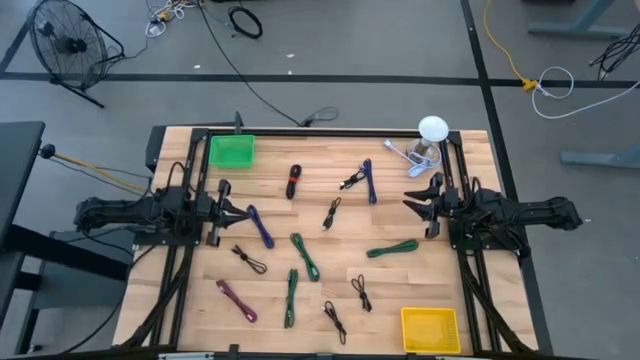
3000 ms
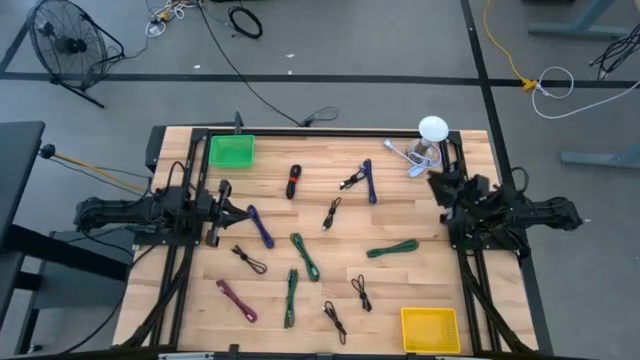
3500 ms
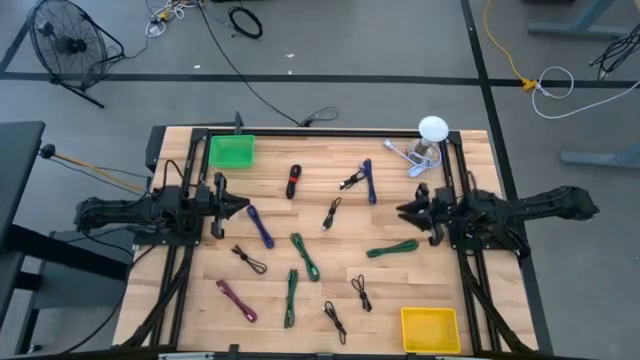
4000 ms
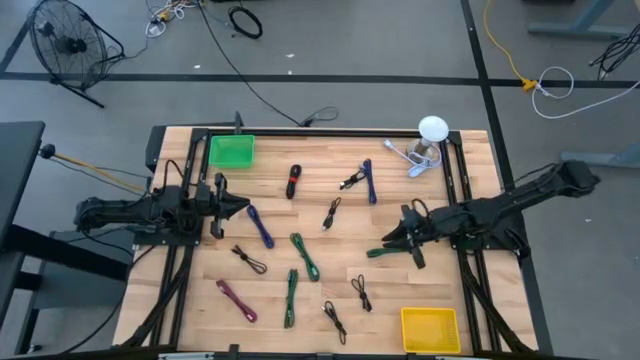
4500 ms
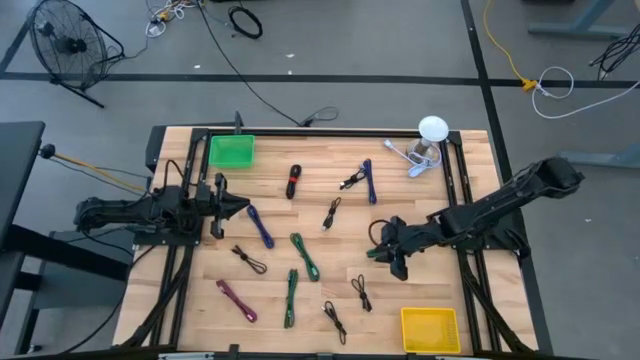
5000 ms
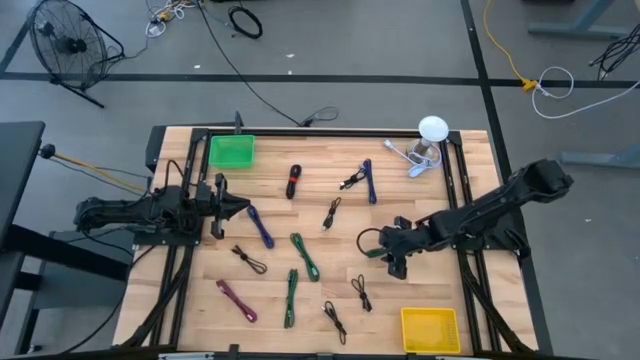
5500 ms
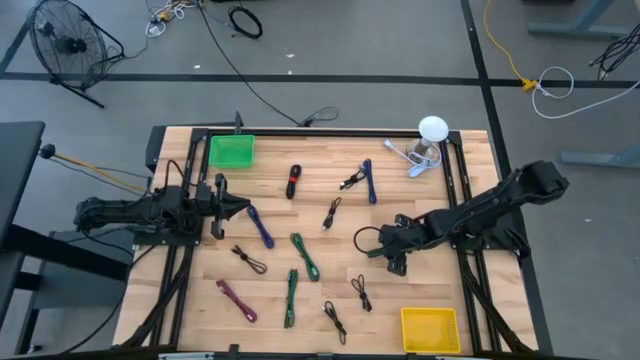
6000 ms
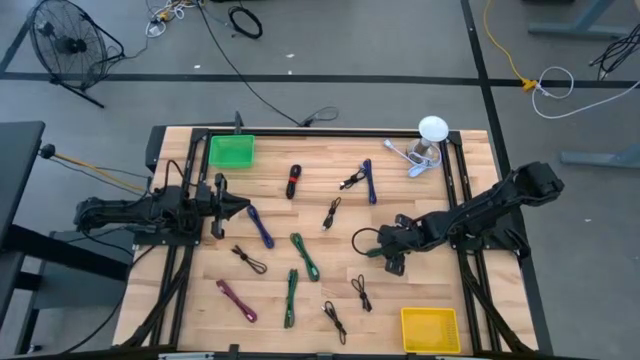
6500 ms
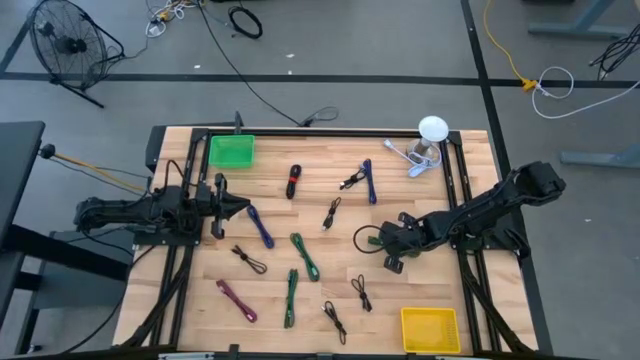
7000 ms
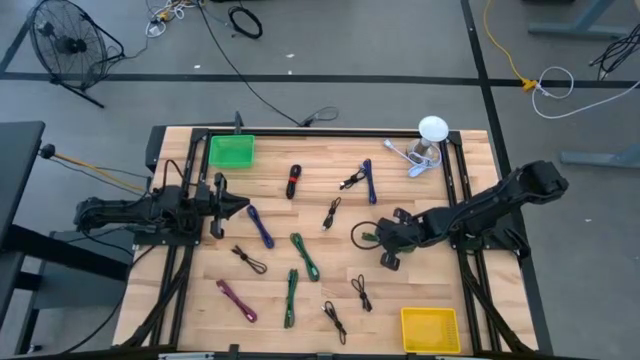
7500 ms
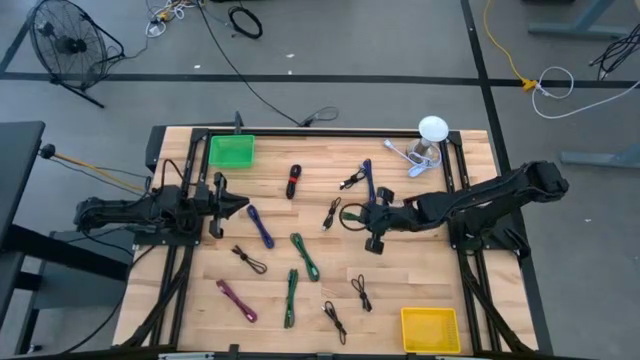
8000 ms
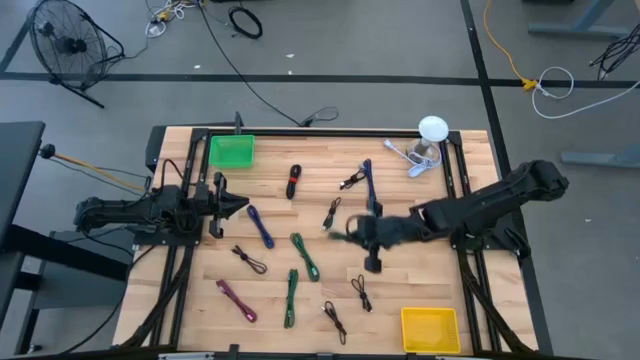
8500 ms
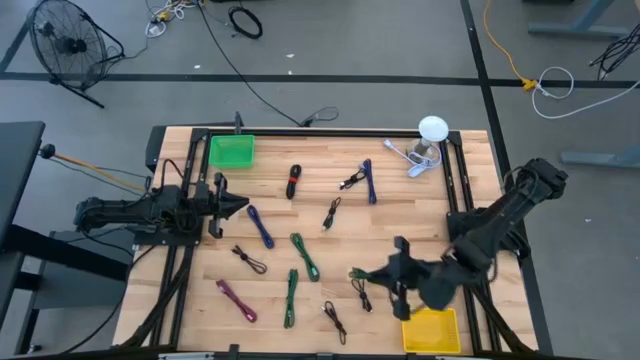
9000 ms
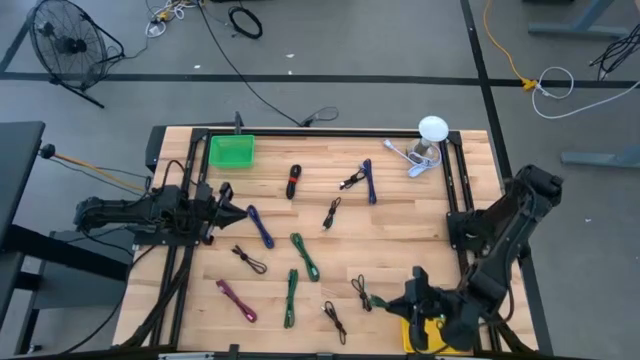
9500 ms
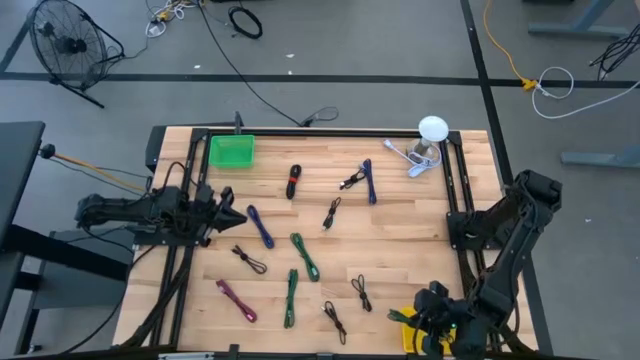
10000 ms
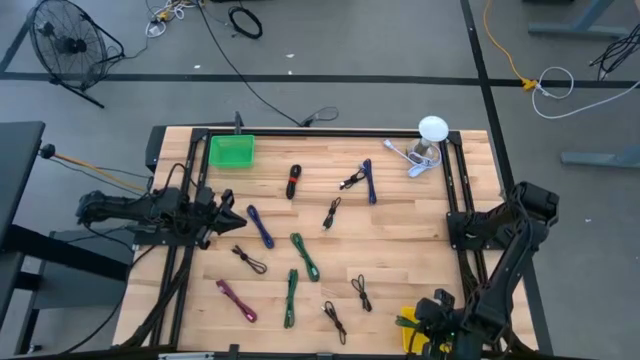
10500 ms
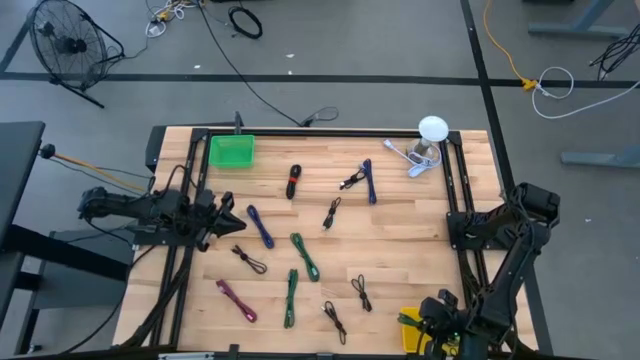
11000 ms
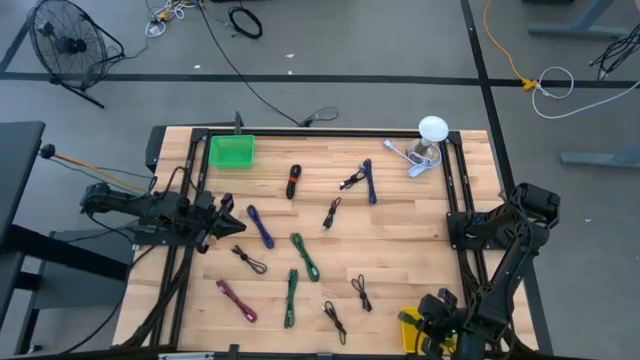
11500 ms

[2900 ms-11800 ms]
Task: Pick & Place USB Port
Put the green charger cable into the yellow bin

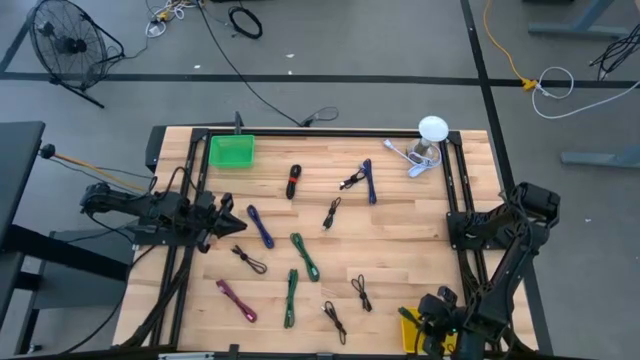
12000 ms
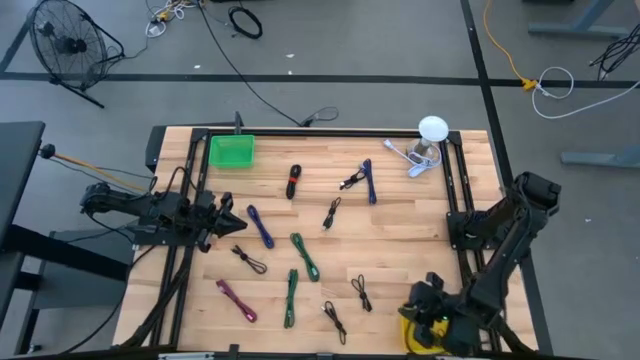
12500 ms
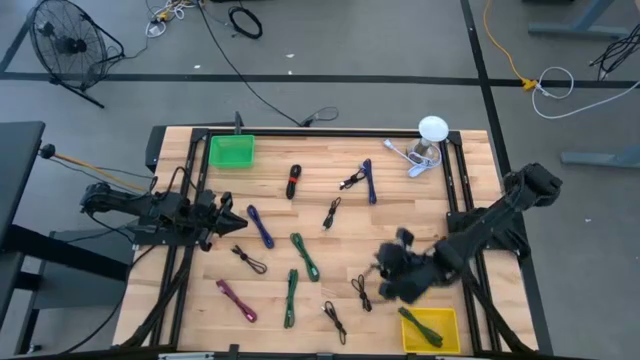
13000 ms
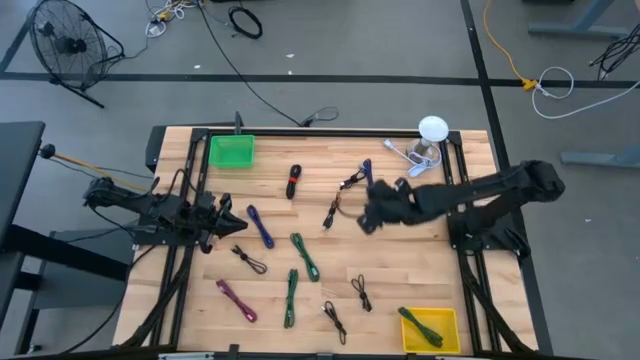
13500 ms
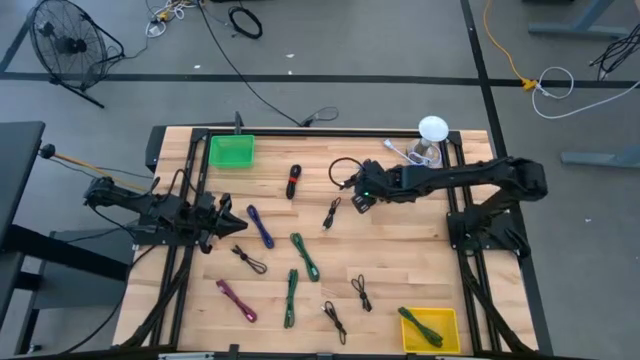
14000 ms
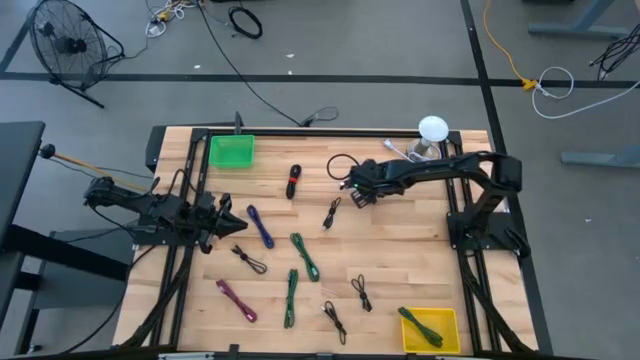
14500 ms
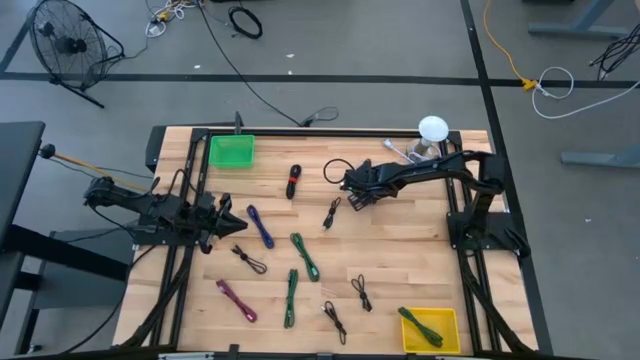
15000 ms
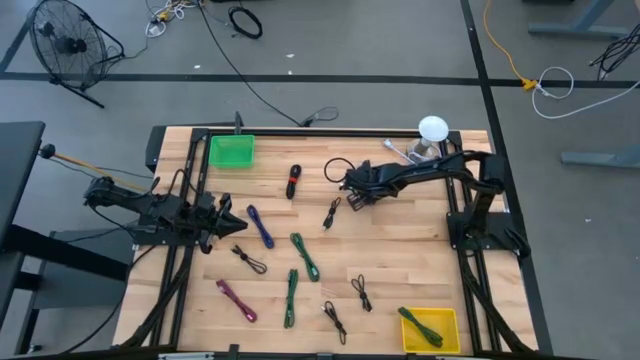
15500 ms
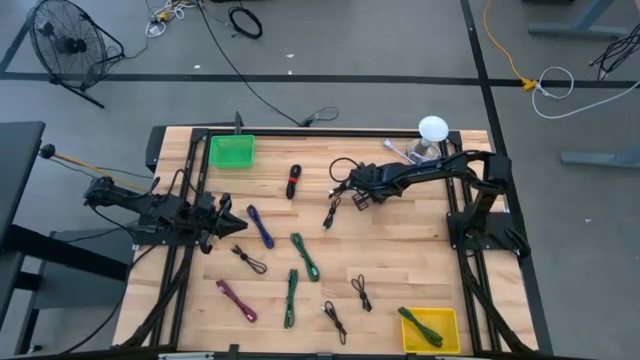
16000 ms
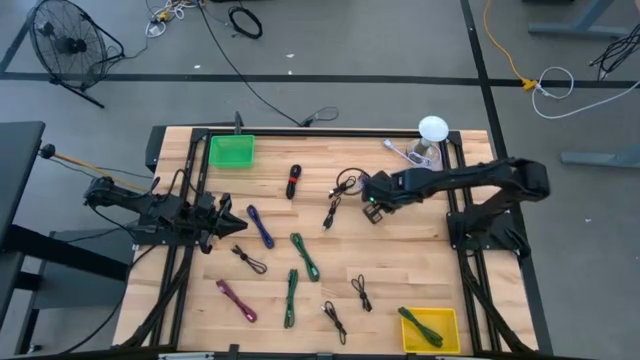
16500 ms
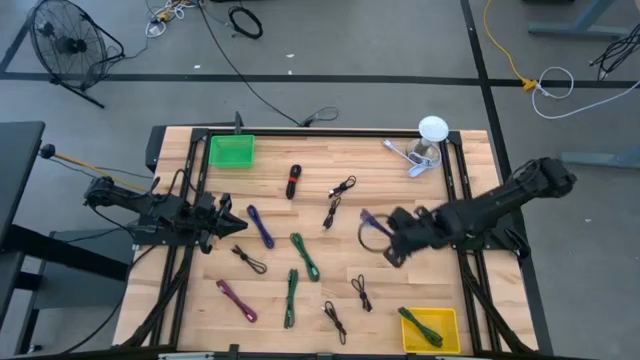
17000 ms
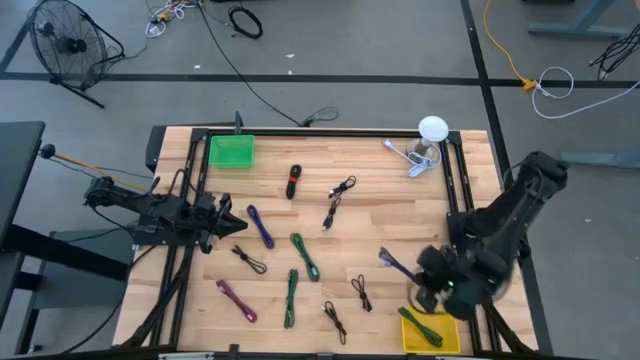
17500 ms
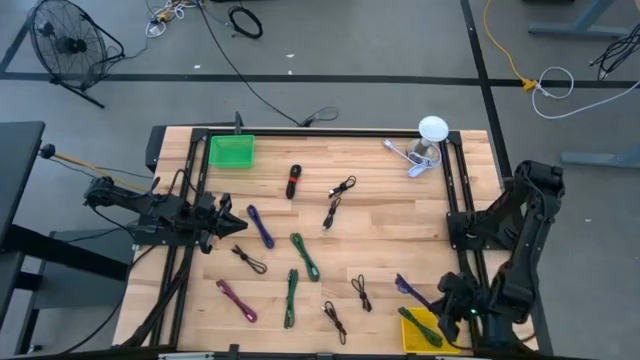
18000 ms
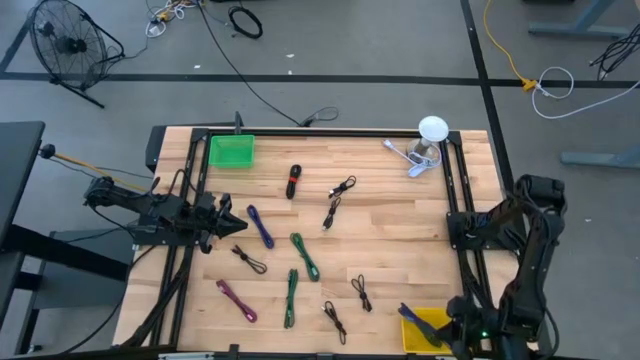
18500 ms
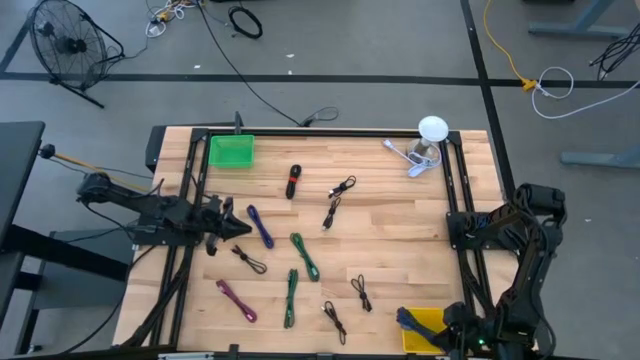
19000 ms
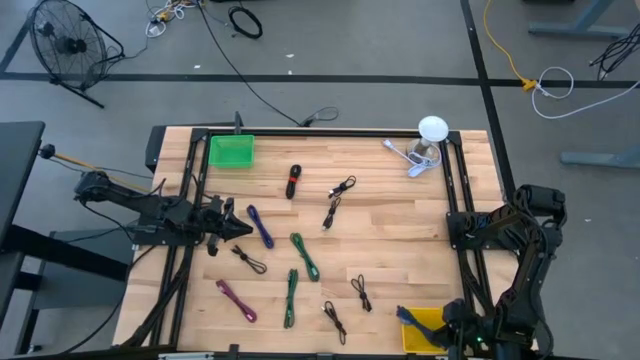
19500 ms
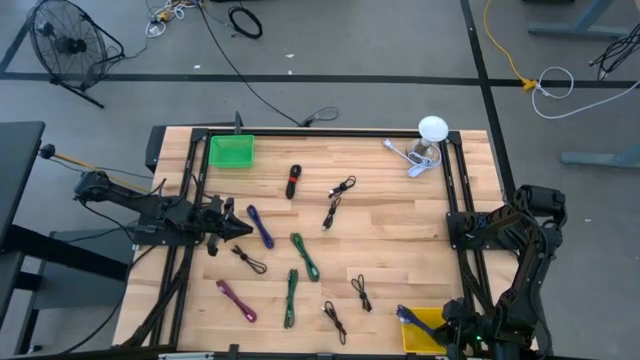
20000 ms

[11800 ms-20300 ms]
Put the blue charger cable into the yellow bin

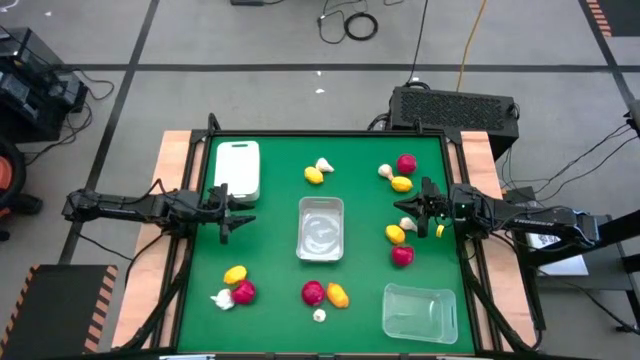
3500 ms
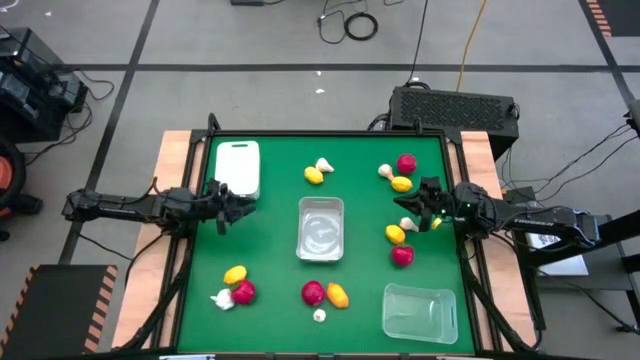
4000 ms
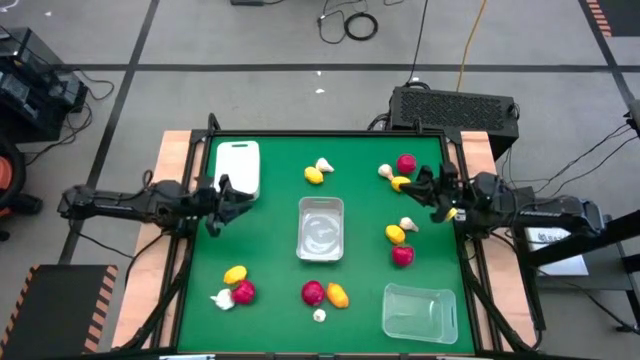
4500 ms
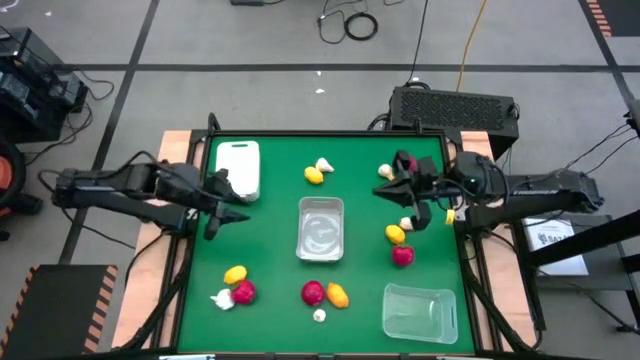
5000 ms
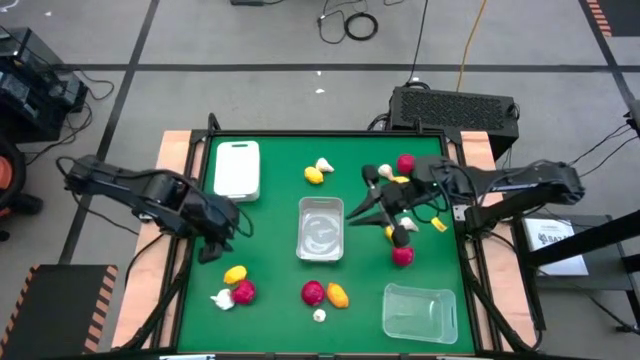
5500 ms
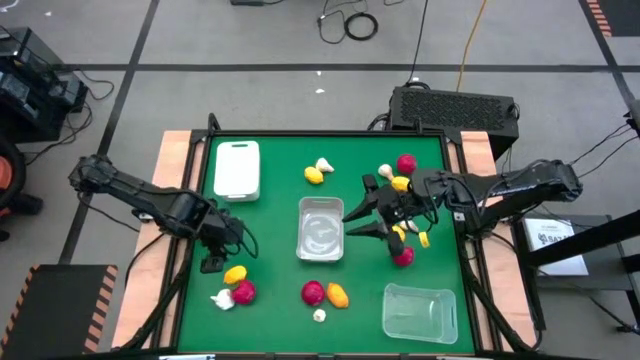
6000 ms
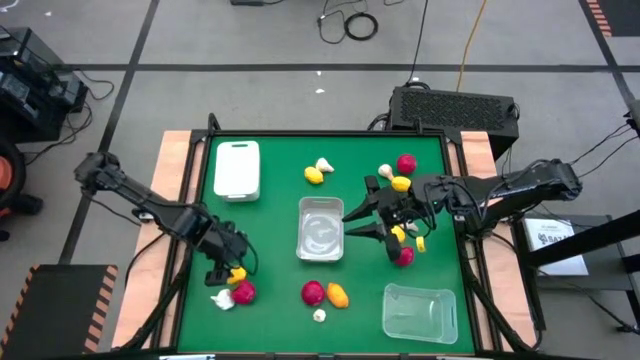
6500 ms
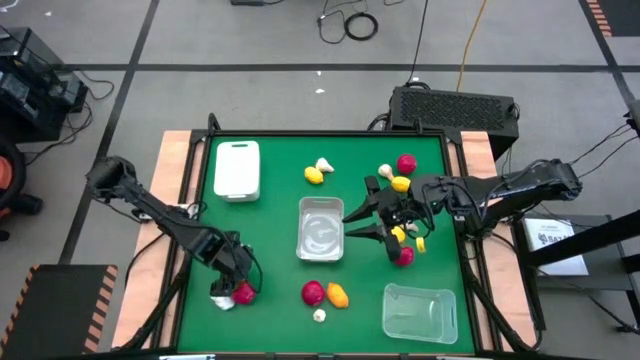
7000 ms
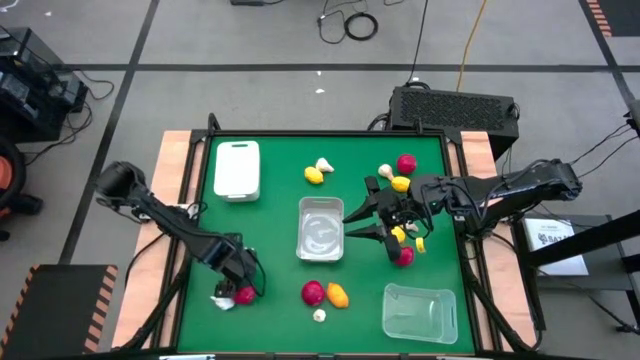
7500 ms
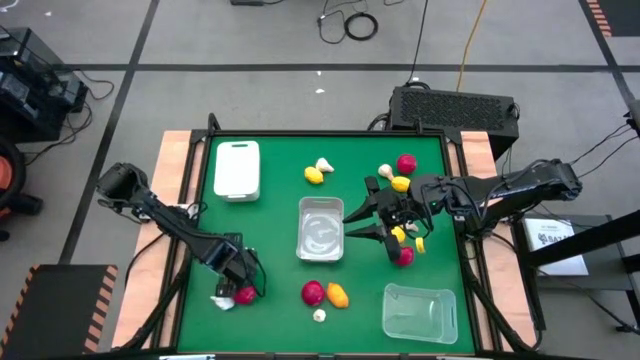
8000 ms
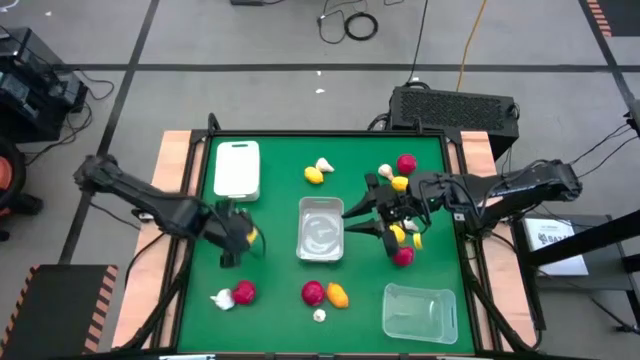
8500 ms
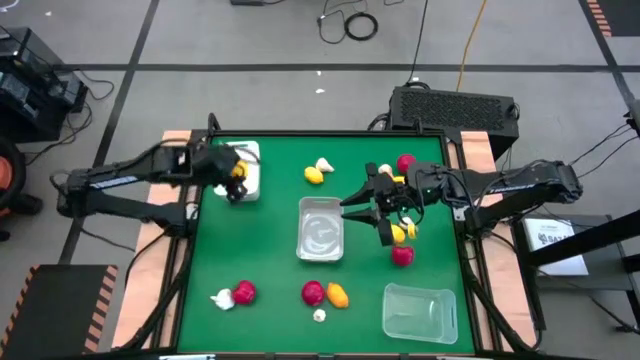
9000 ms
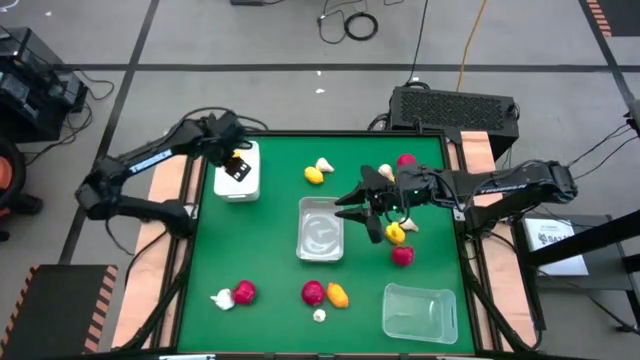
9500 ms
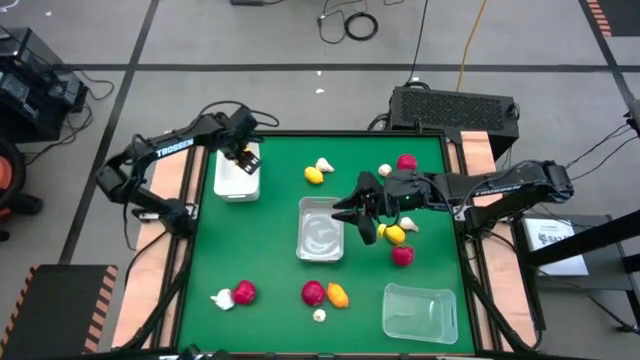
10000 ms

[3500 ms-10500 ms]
Task: Sort produce into baskets
Put the lemon into the white bin
